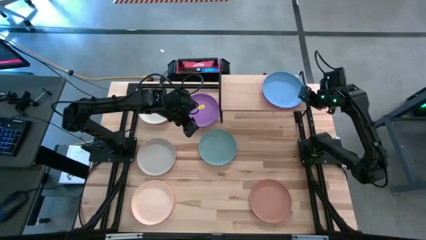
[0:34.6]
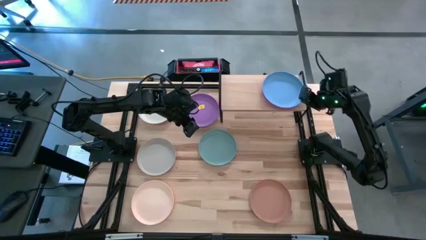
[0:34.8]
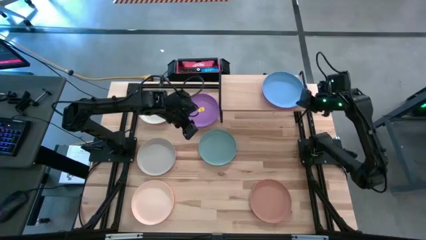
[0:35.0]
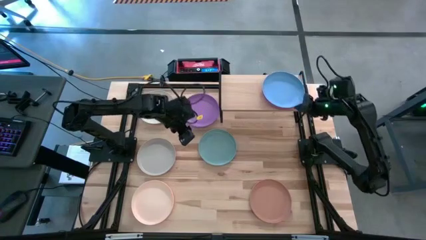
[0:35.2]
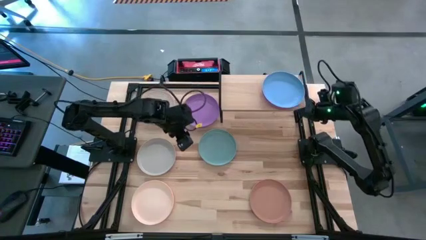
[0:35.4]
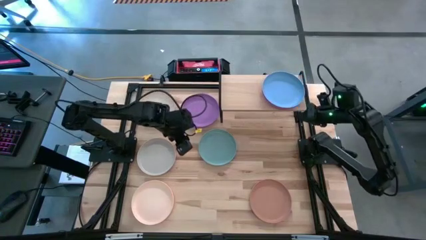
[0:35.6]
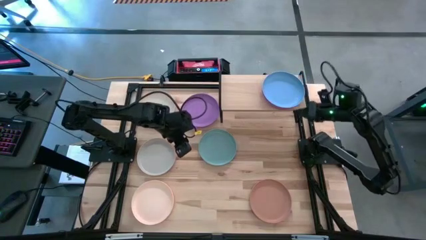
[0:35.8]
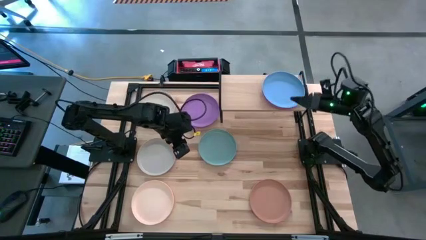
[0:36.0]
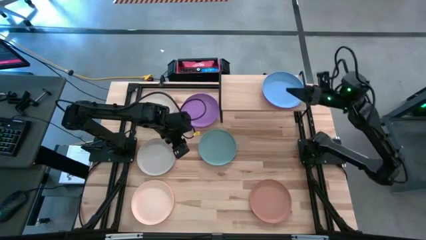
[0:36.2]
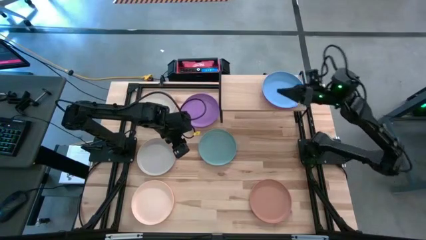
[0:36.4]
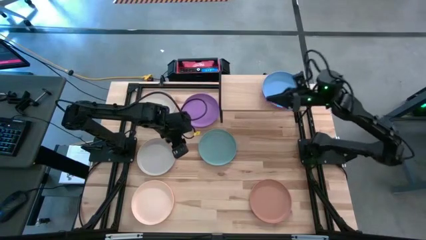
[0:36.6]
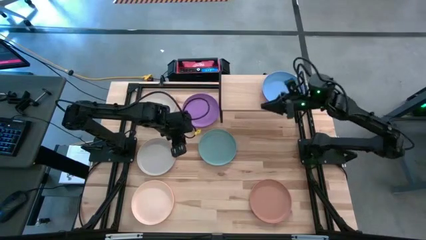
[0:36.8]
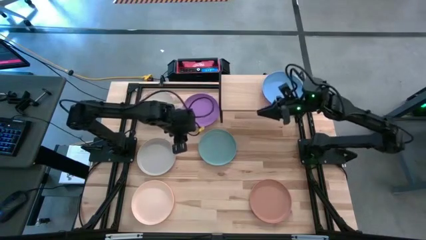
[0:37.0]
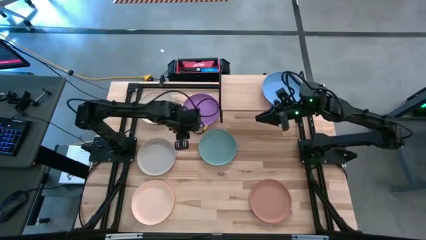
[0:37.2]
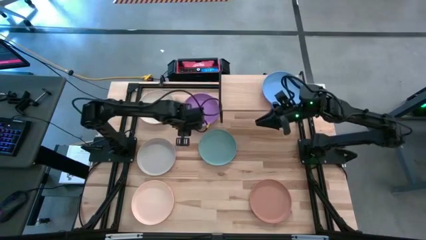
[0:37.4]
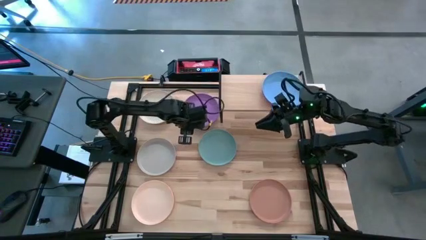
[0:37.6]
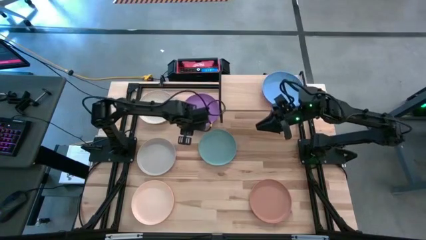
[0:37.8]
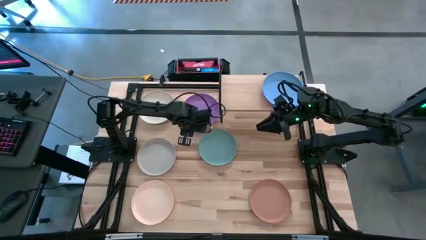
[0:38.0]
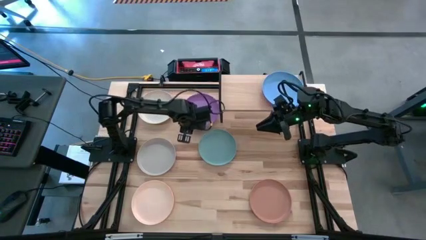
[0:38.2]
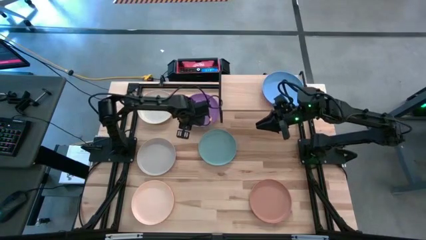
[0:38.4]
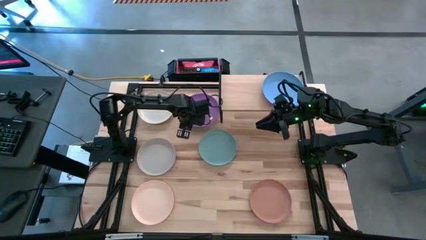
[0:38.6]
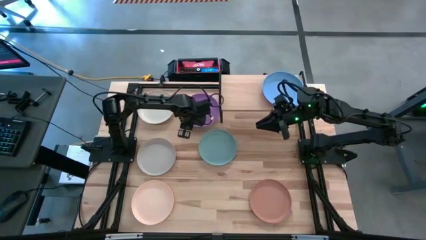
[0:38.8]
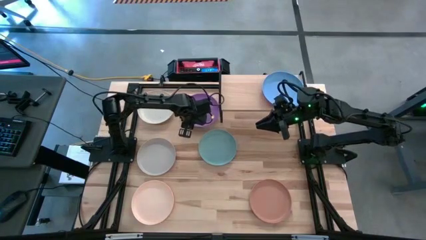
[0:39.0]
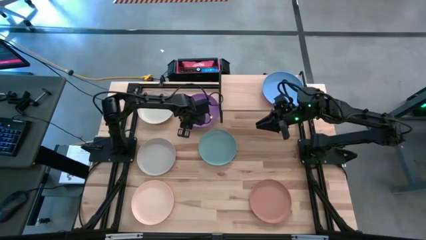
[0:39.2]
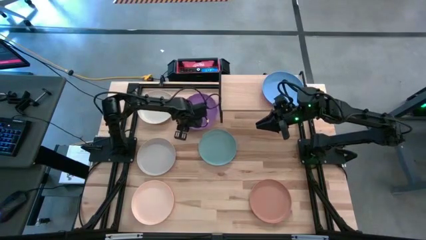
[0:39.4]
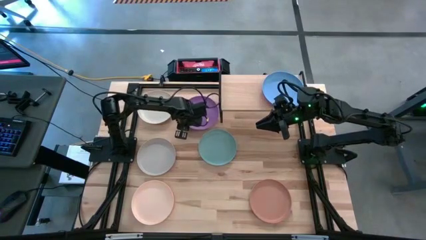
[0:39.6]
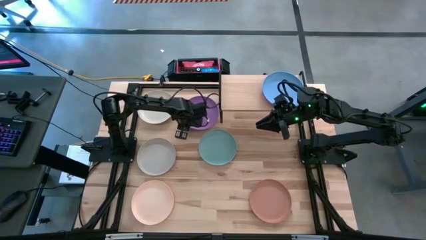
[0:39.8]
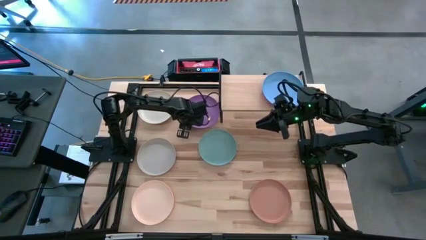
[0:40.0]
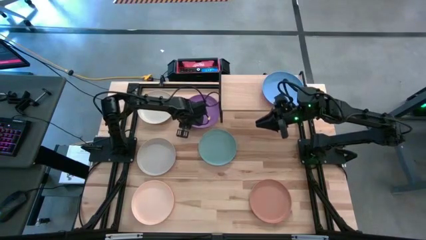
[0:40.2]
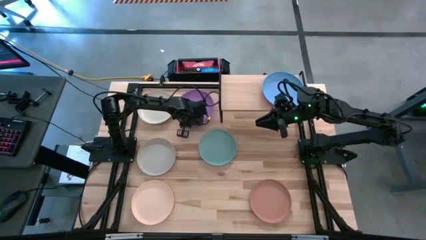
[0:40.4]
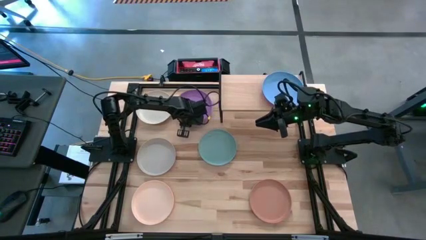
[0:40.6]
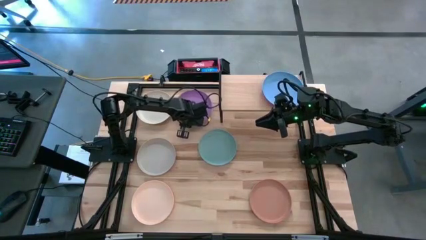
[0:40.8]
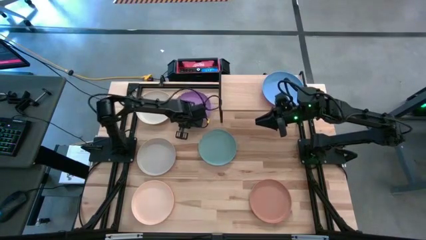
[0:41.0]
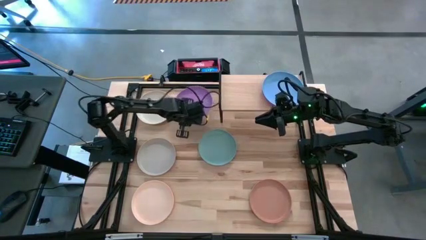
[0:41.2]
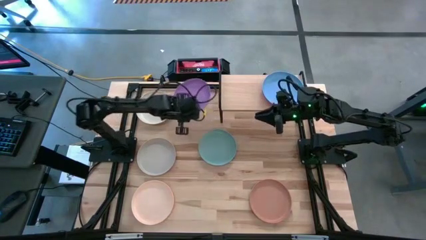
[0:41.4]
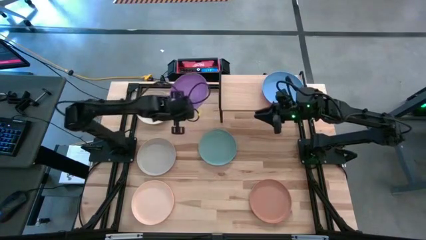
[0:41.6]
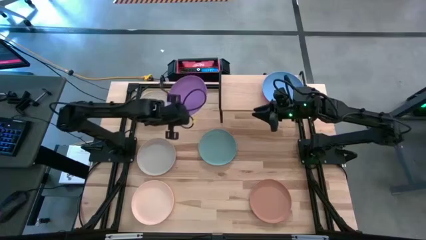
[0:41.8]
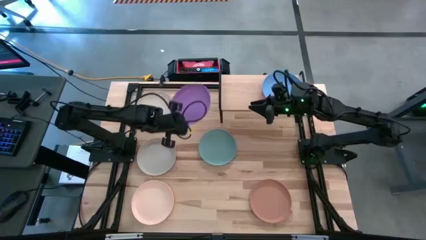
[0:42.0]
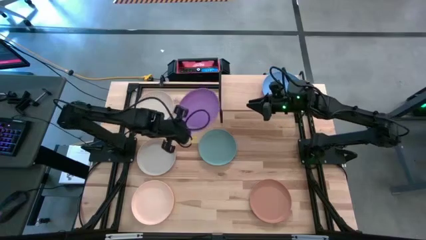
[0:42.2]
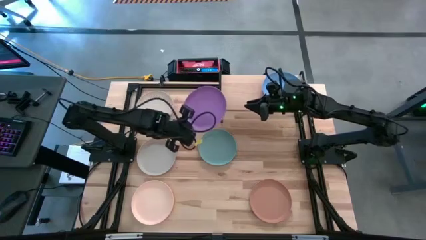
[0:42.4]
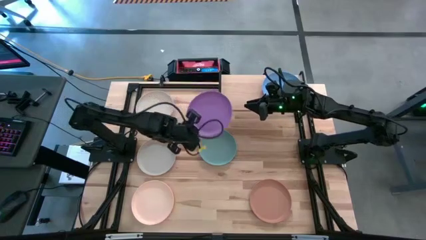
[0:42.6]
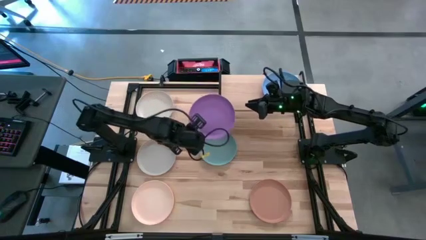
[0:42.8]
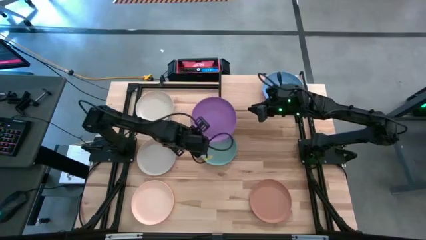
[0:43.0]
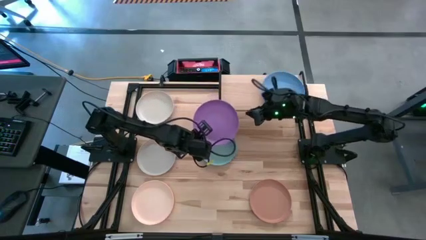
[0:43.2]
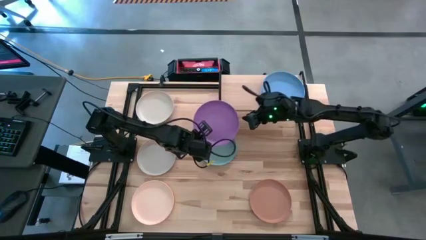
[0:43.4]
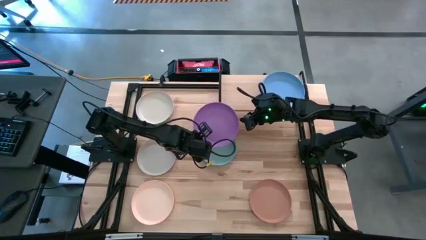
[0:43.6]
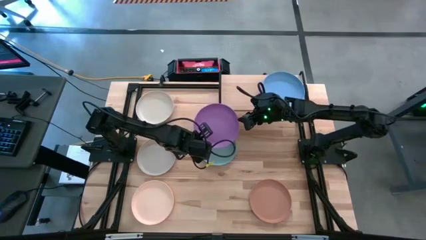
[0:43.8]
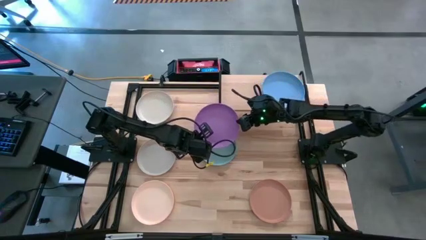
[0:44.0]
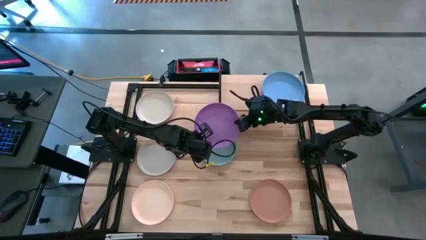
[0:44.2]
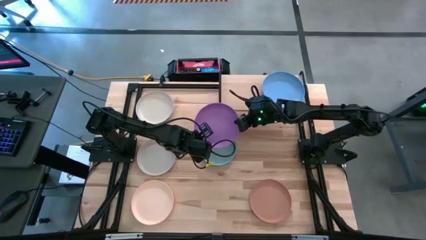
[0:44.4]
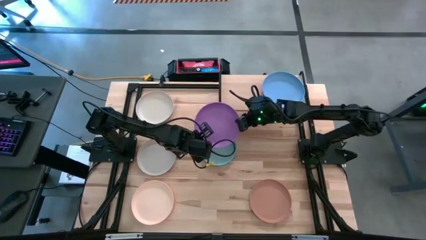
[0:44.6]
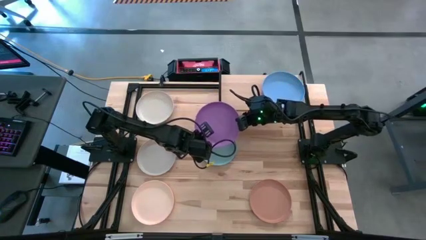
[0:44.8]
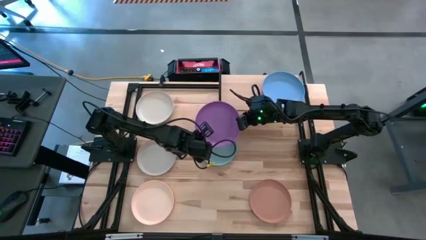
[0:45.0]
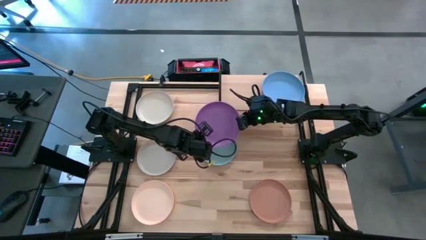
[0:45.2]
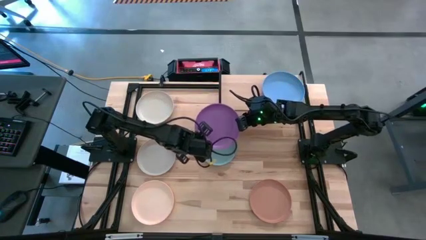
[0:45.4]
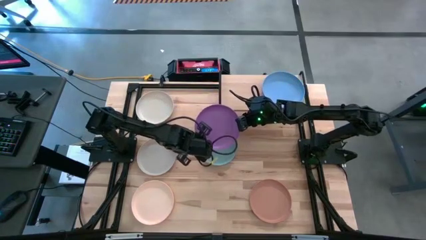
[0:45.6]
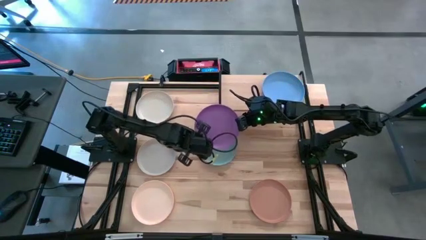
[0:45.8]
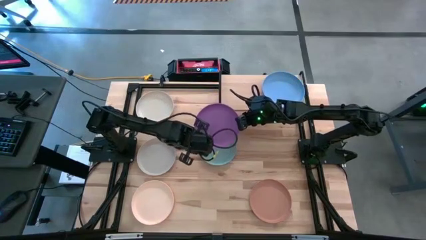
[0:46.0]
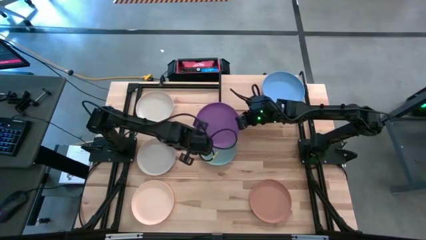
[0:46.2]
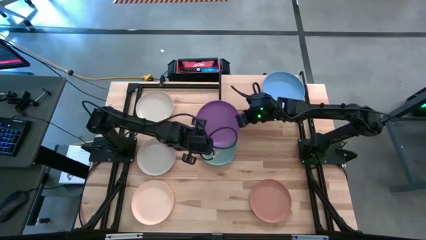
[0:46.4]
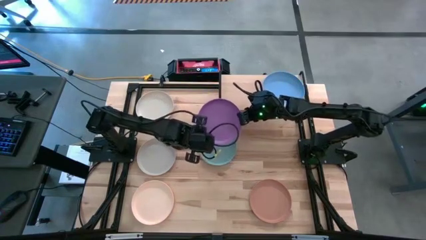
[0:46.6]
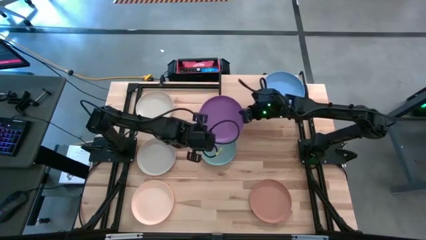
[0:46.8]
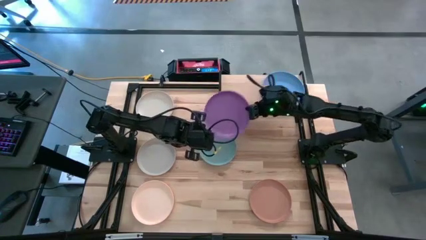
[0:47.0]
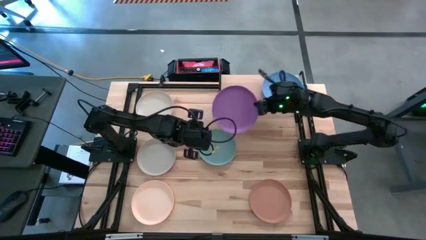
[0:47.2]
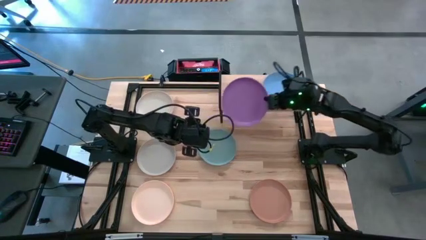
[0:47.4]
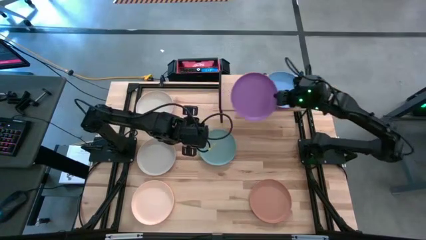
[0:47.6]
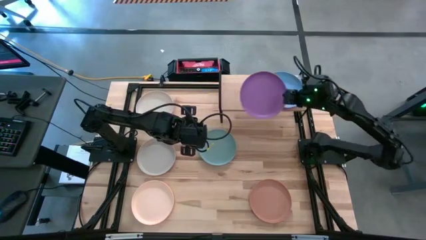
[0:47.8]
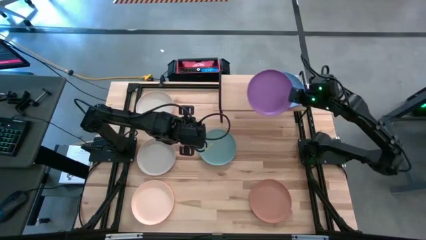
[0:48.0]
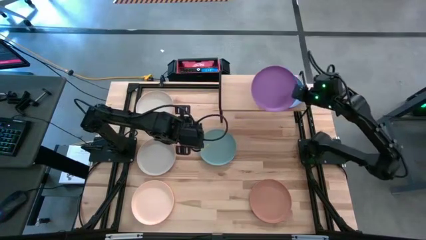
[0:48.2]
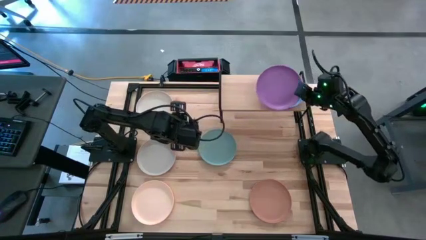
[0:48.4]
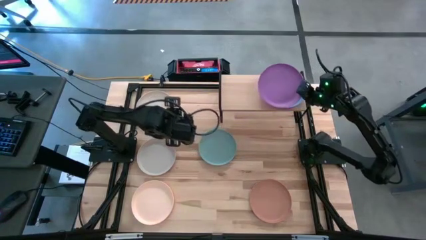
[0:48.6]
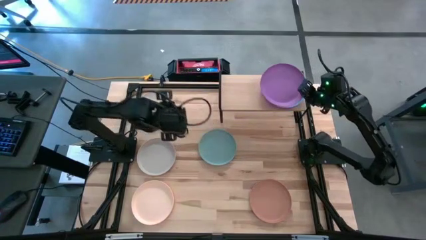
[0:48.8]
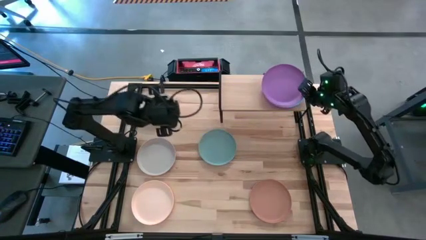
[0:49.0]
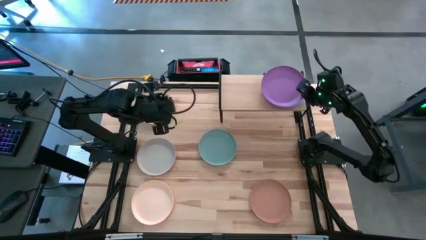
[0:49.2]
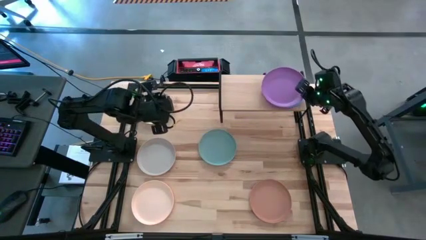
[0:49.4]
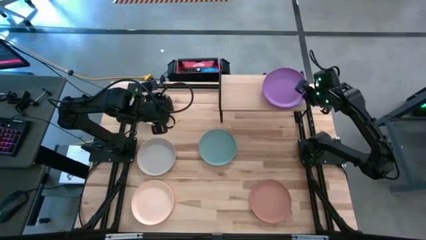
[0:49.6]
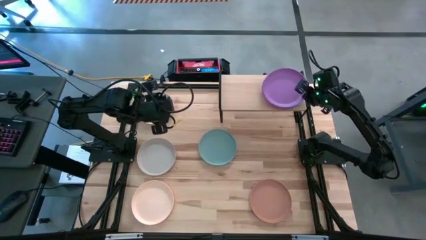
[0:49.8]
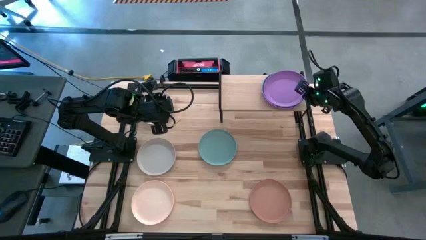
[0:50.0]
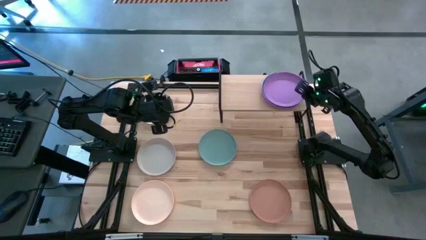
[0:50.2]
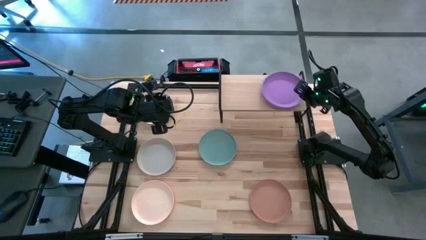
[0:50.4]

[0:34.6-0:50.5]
Task: Place and stack plates onto a shelf
Stack the purple plate on top of the blue plate on the shelf
